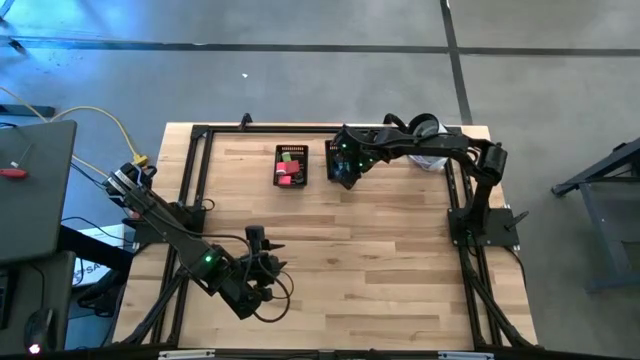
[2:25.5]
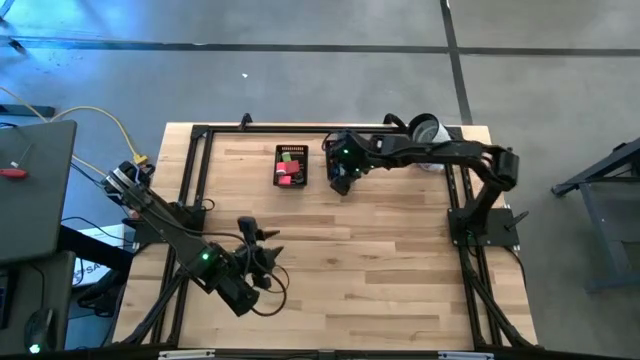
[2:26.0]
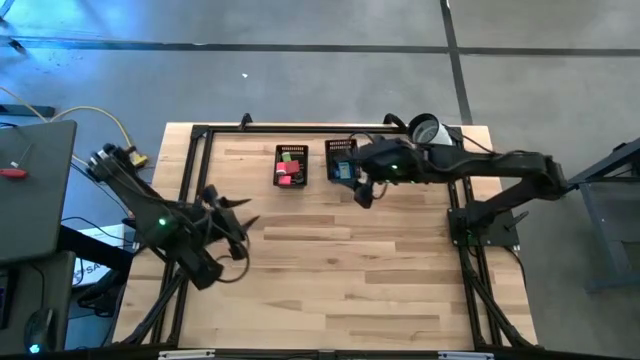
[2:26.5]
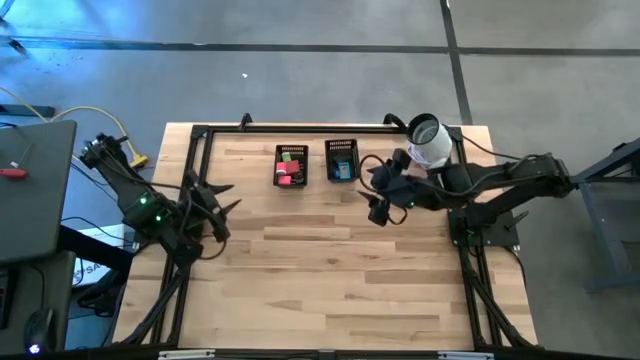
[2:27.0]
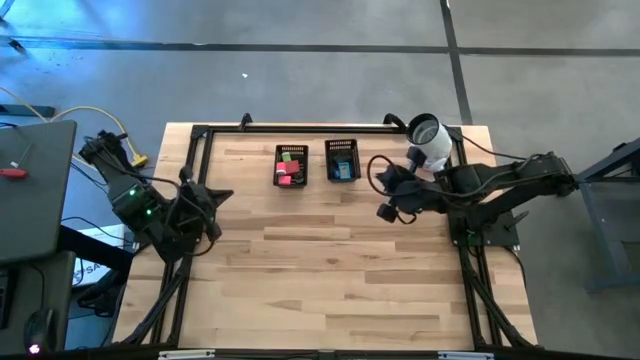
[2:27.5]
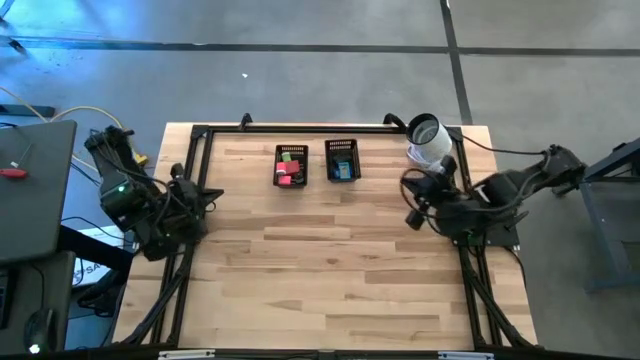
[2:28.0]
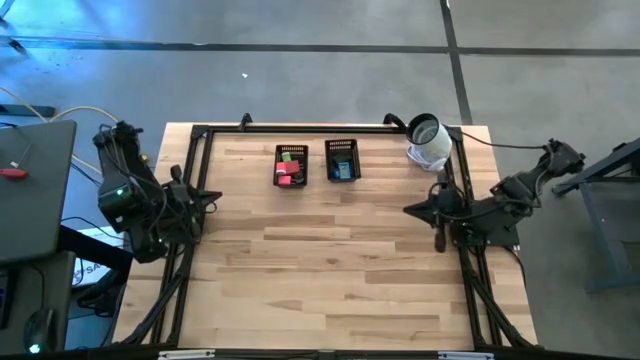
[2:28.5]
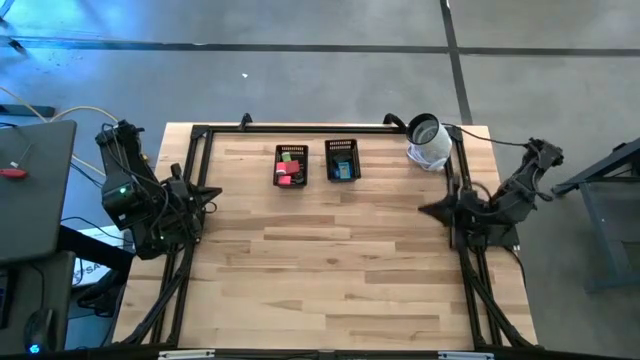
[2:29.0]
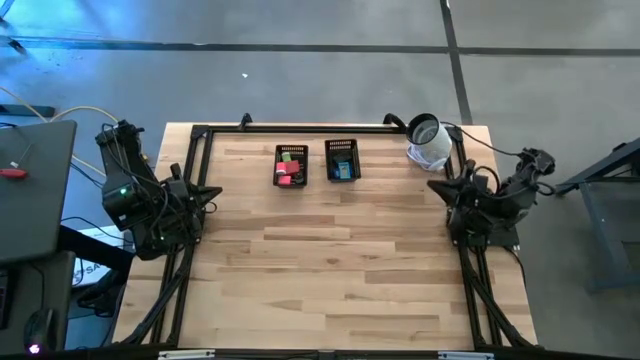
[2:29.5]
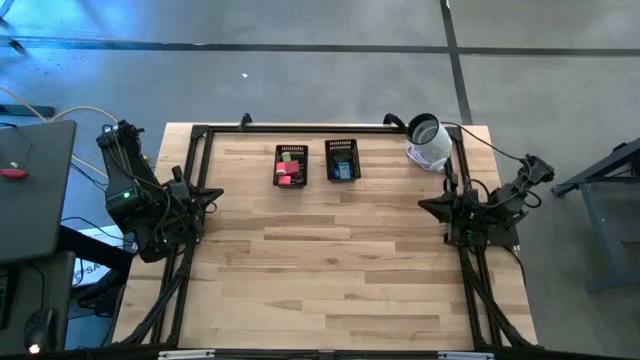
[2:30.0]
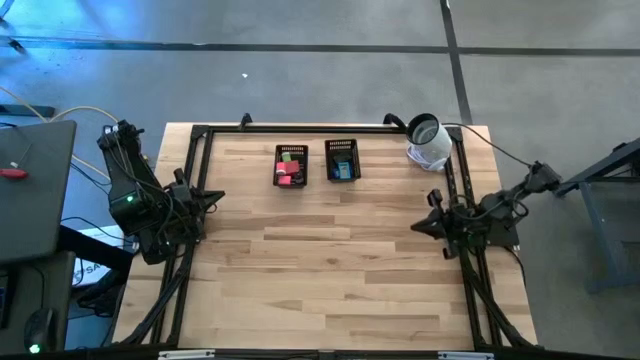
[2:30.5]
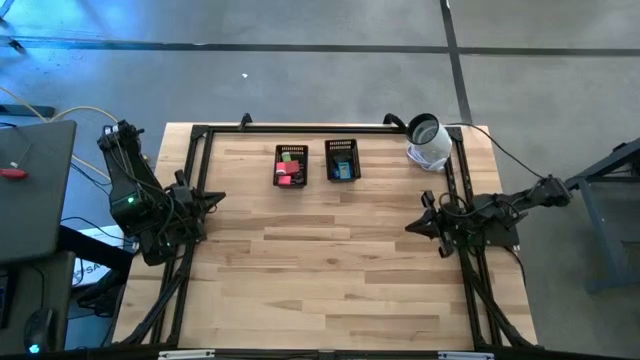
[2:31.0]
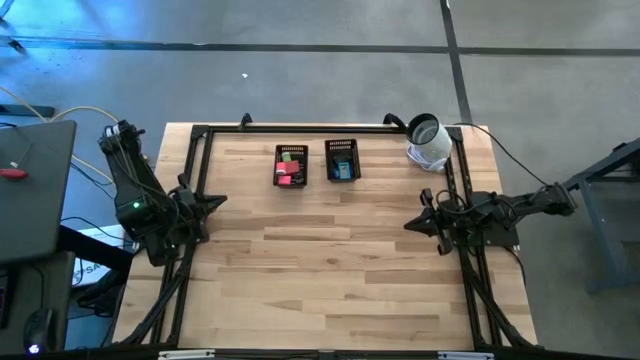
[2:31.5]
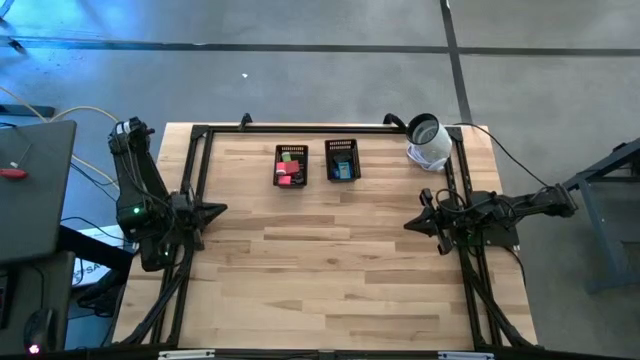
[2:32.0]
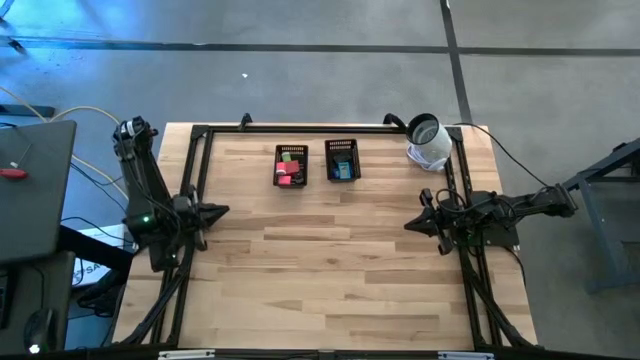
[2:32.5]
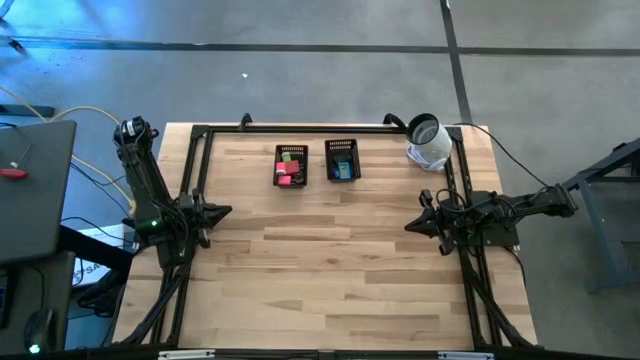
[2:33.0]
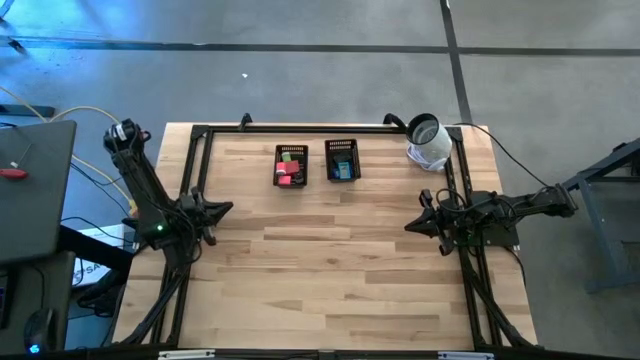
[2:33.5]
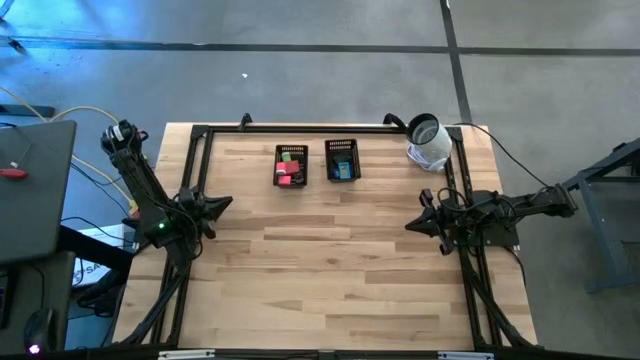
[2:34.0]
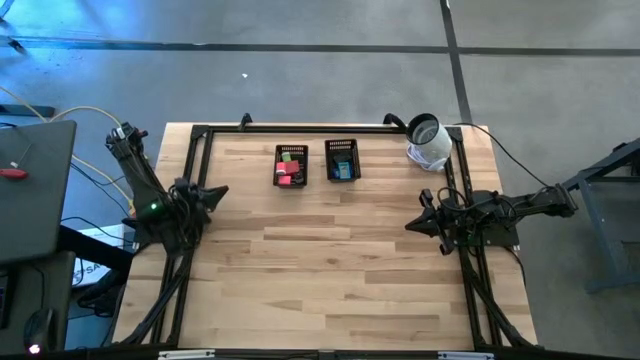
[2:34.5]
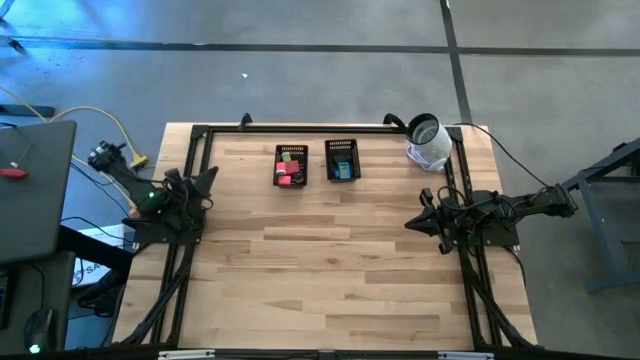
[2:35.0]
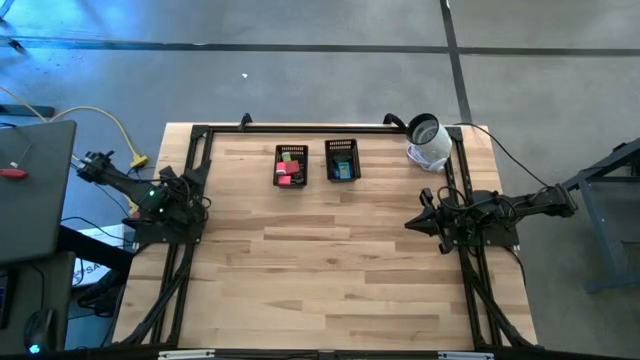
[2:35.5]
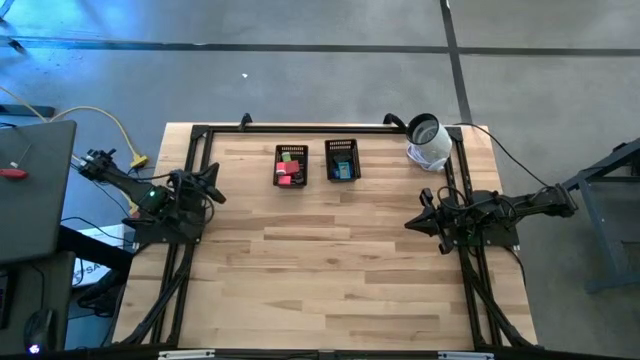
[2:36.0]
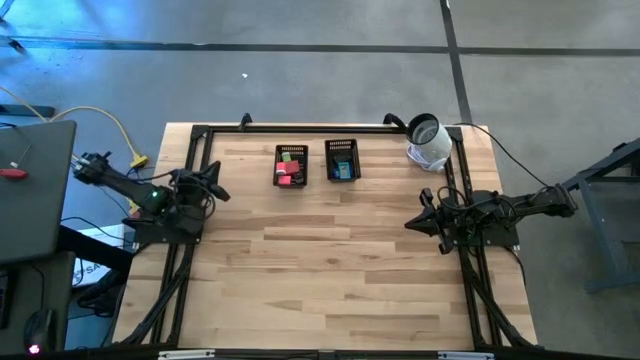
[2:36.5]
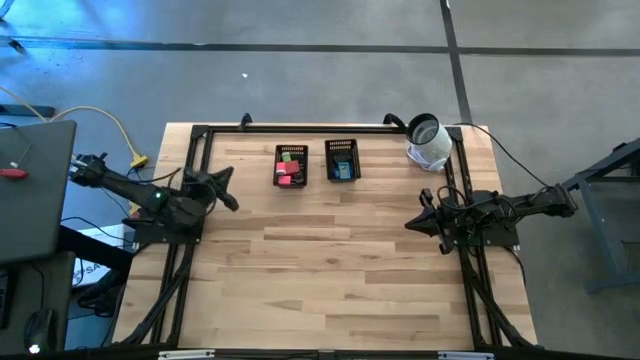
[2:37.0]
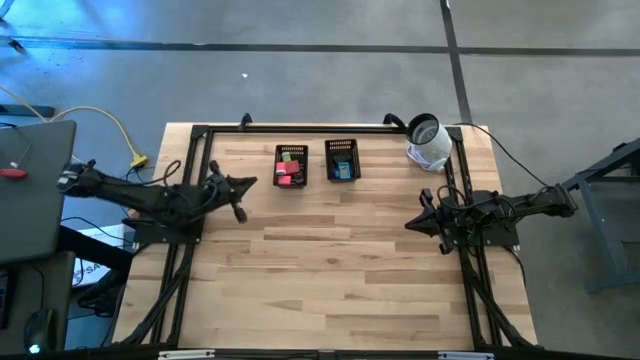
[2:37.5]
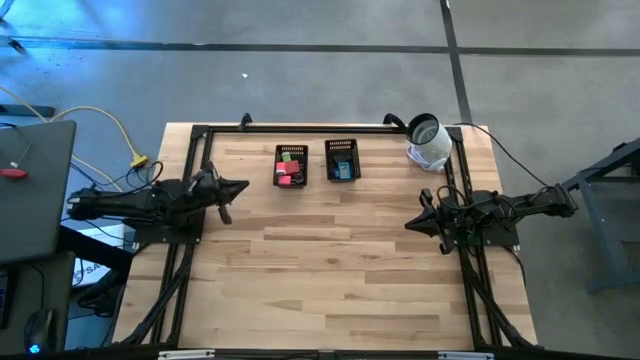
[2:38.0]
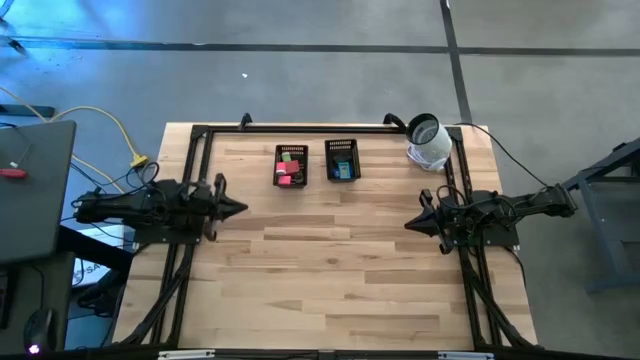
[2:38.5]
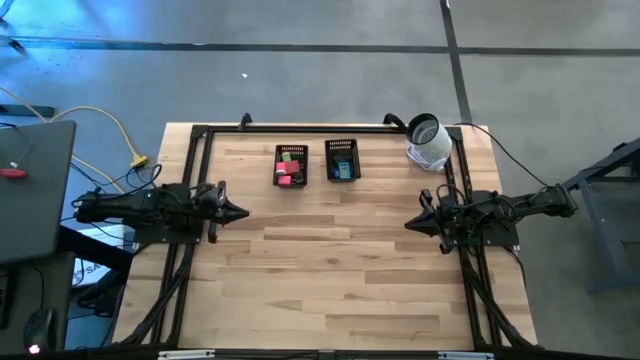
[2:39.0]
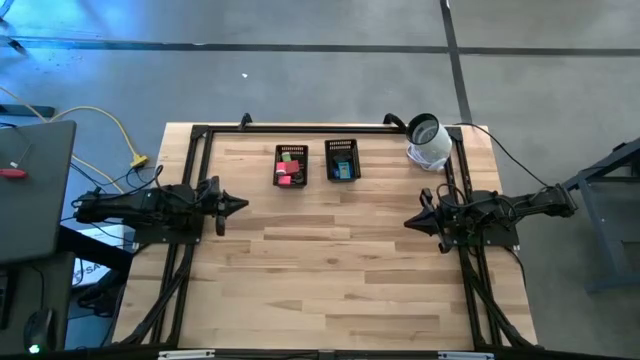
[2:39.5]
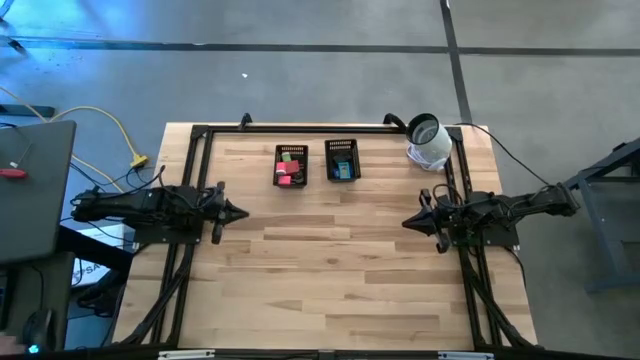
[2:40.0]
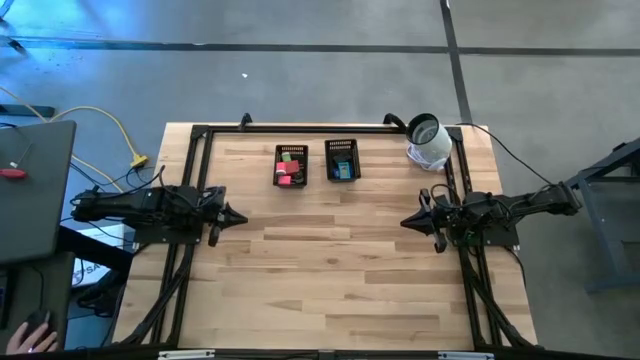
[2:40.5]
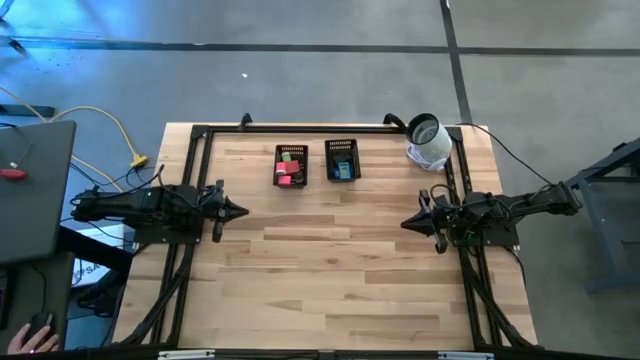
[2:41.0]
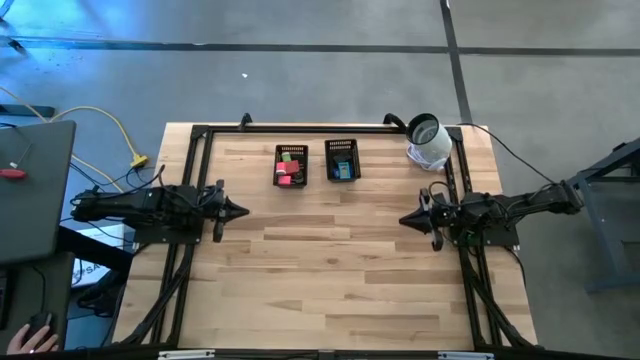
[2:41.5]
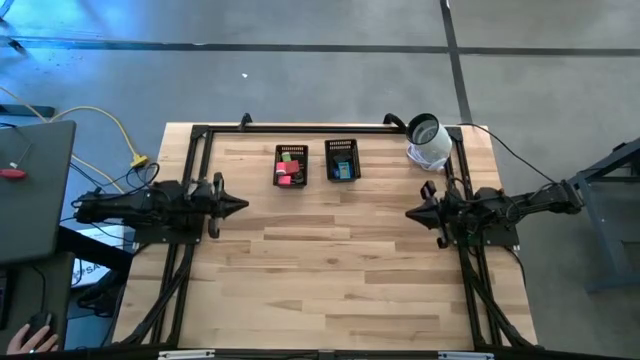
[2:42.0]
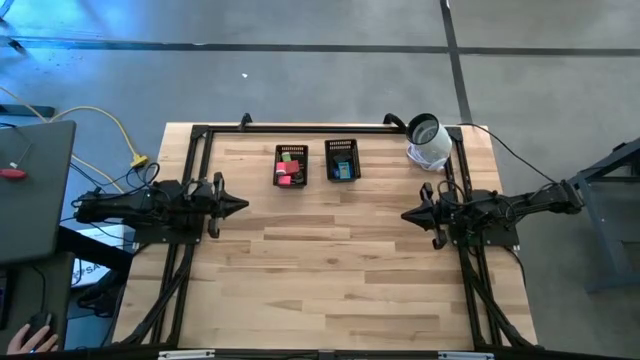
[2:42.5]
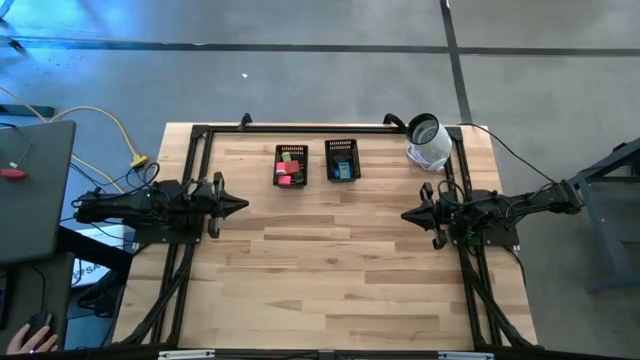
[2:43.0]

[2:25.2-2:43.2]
Task: Pick & Place Office items
Return to Home Position

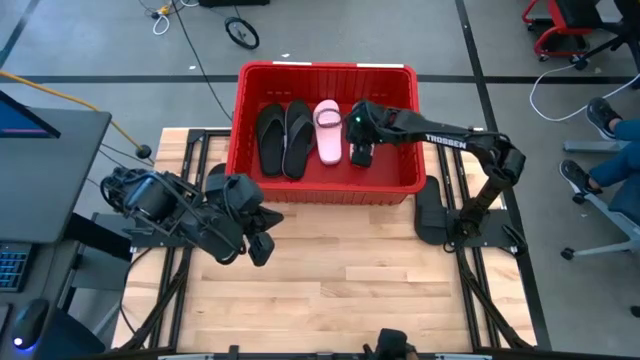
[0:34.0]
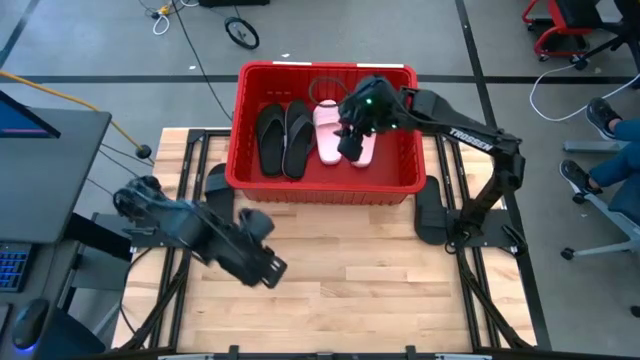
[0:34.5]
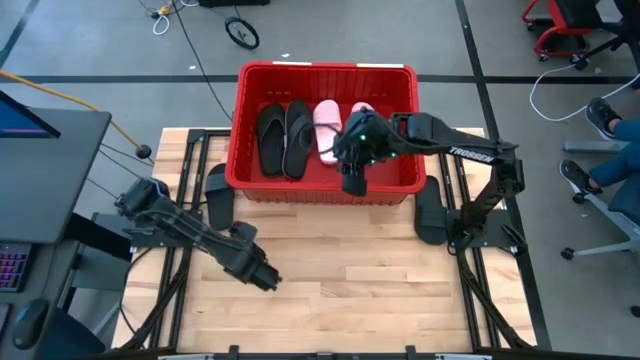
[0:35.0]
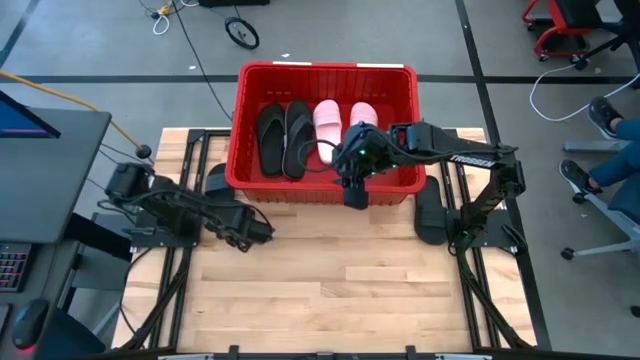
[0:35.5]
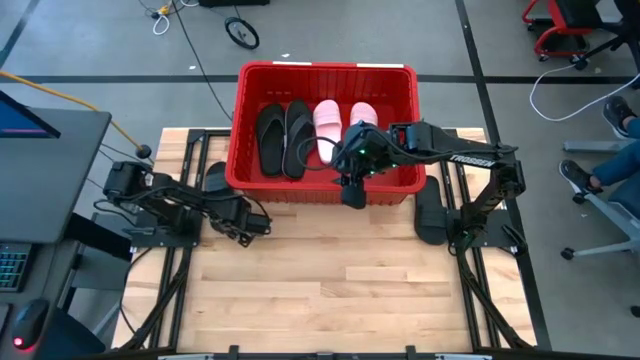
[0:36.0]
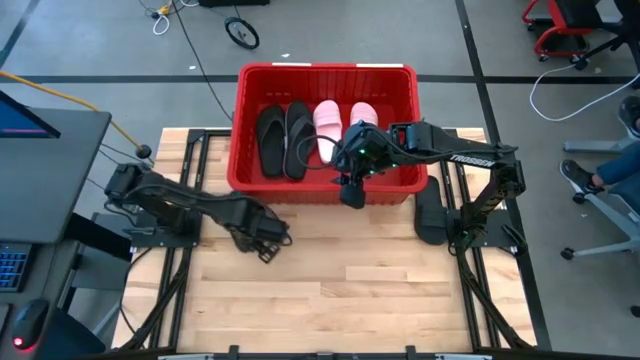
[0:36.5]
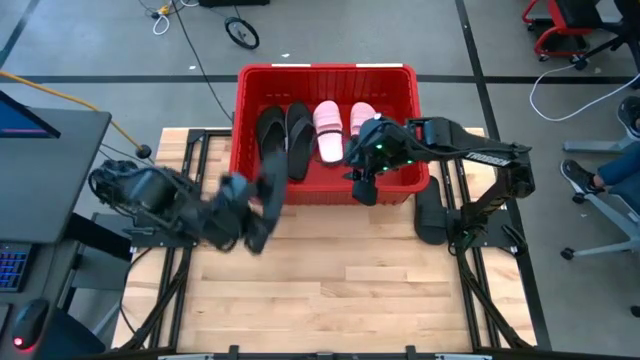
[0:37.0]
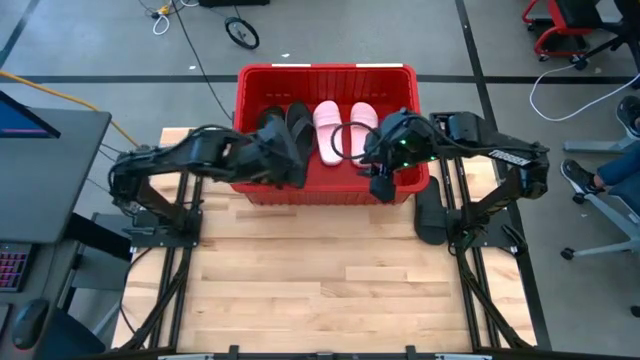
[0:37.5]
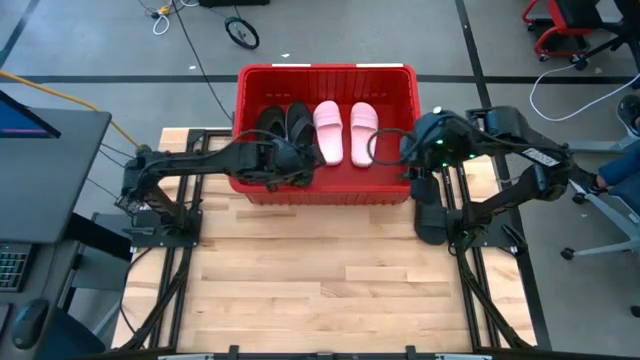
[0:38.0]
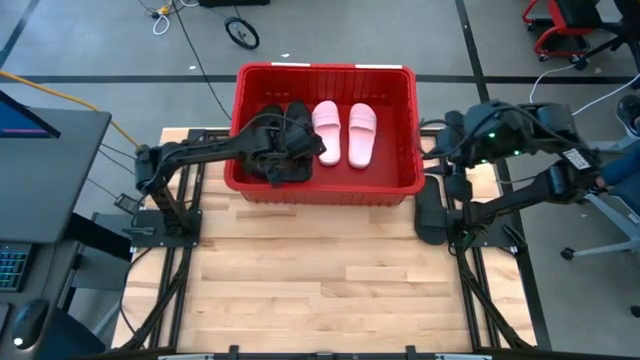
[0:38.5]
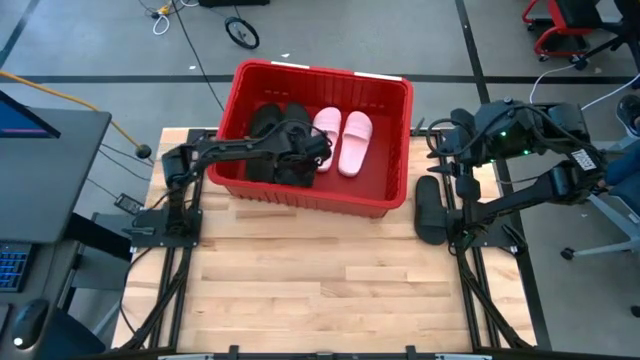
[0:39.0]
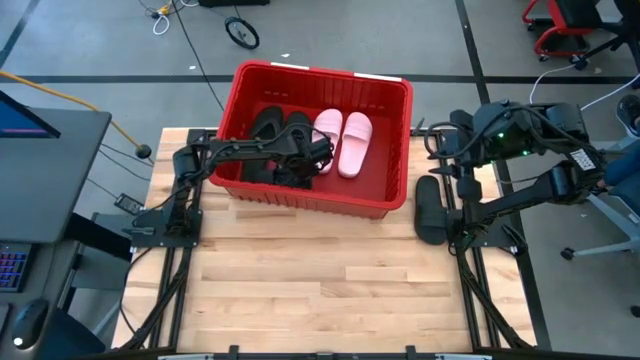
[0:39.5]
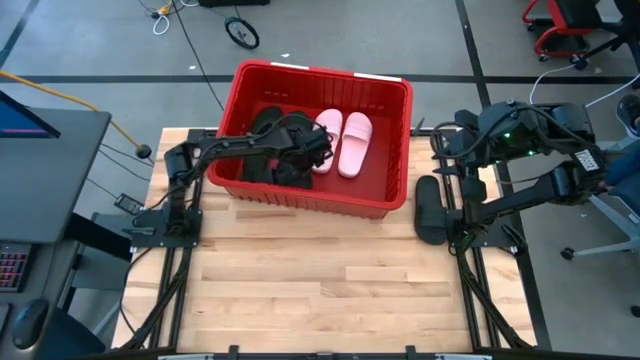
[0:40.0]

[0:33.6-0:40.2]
Task: Pick and place slides into bin
Put the black slipper into the red bin
